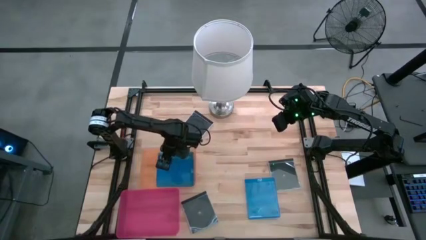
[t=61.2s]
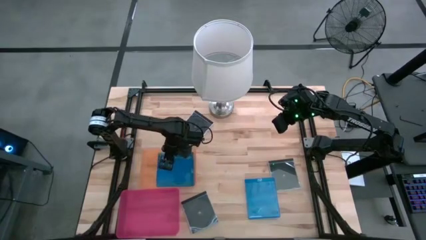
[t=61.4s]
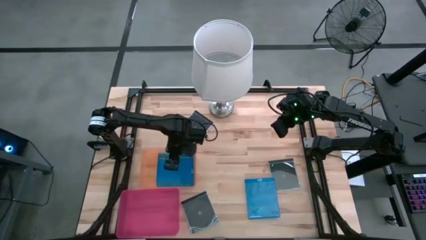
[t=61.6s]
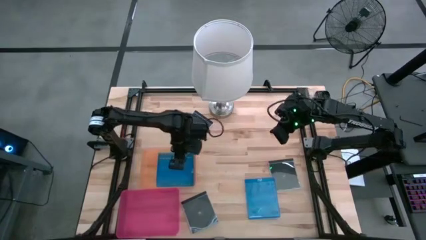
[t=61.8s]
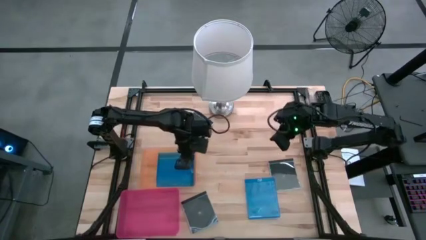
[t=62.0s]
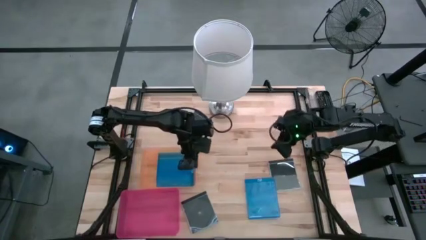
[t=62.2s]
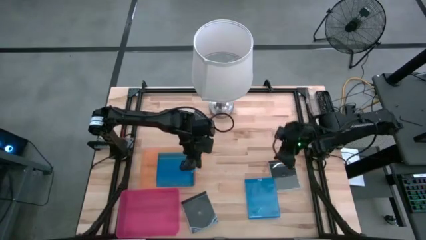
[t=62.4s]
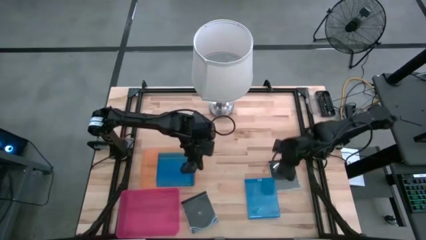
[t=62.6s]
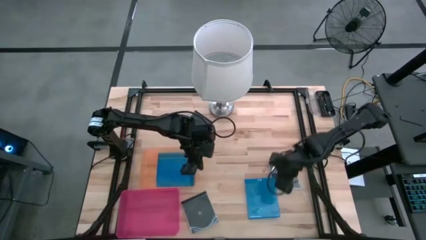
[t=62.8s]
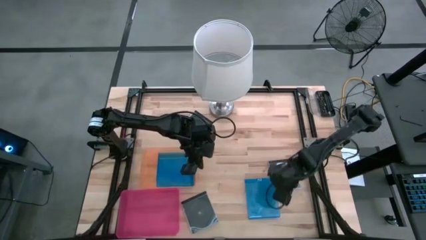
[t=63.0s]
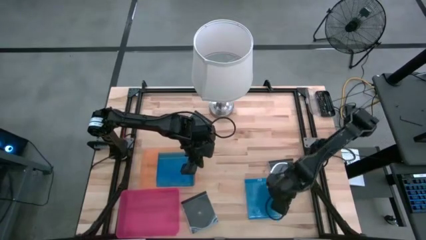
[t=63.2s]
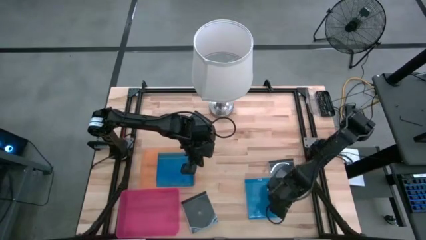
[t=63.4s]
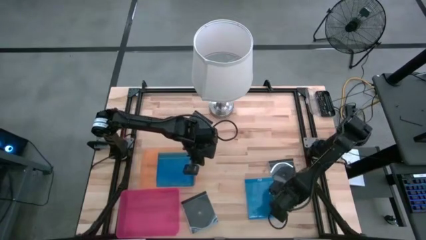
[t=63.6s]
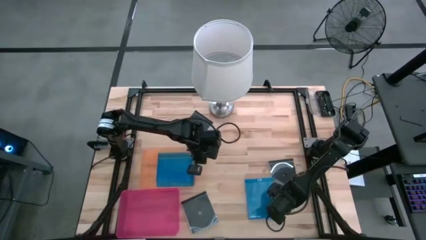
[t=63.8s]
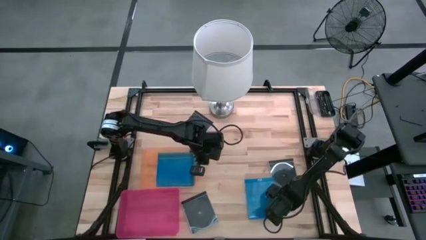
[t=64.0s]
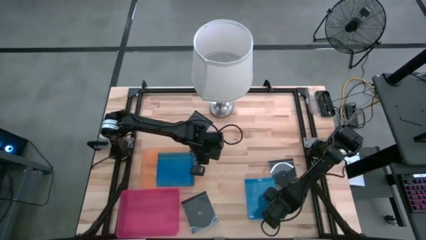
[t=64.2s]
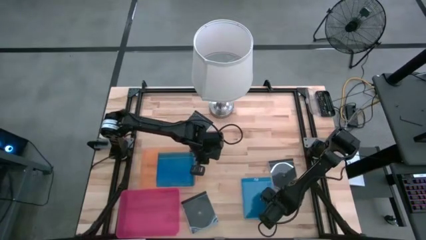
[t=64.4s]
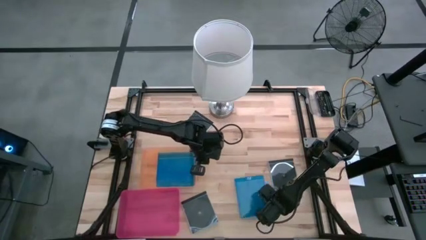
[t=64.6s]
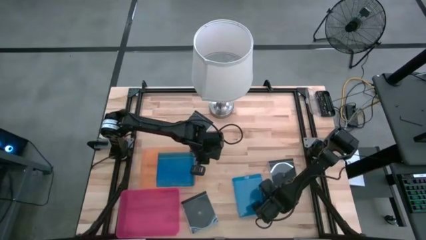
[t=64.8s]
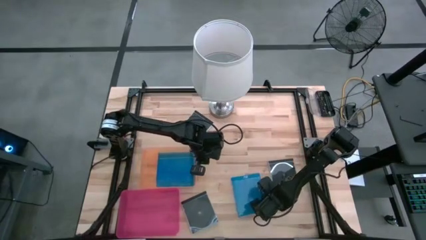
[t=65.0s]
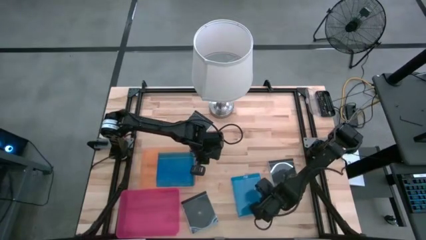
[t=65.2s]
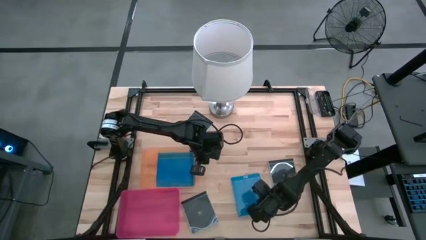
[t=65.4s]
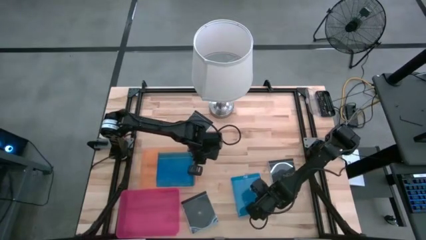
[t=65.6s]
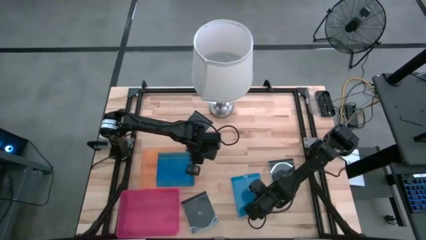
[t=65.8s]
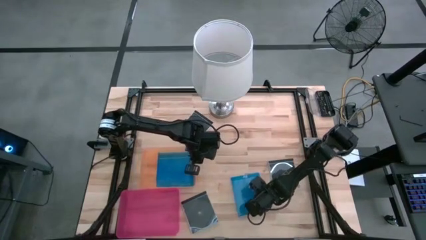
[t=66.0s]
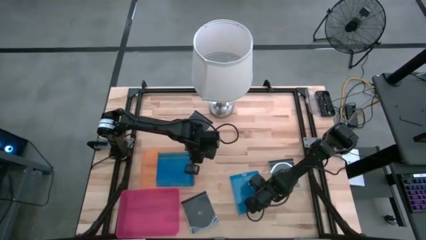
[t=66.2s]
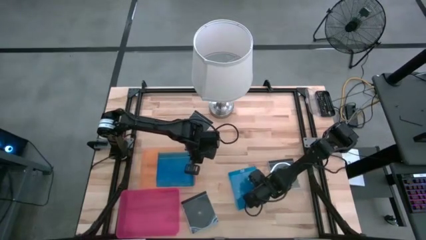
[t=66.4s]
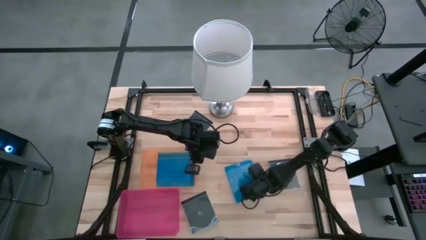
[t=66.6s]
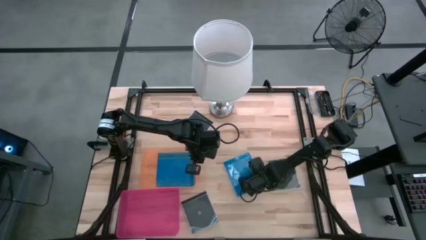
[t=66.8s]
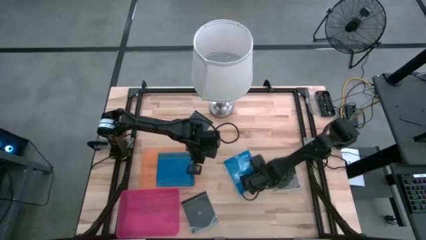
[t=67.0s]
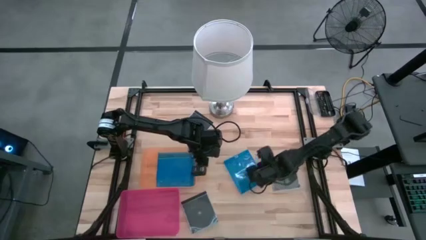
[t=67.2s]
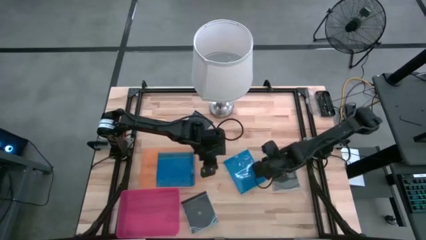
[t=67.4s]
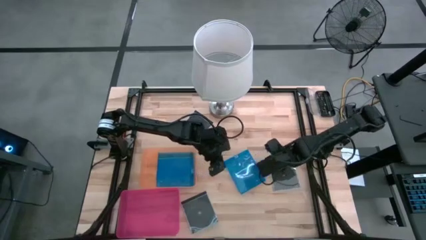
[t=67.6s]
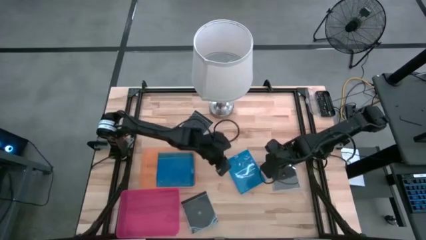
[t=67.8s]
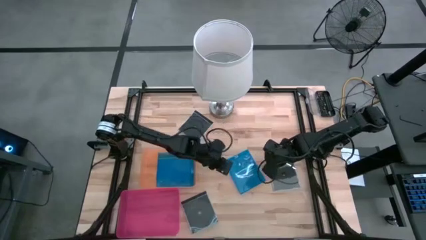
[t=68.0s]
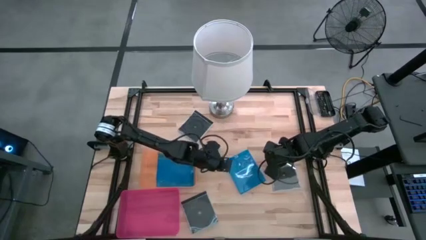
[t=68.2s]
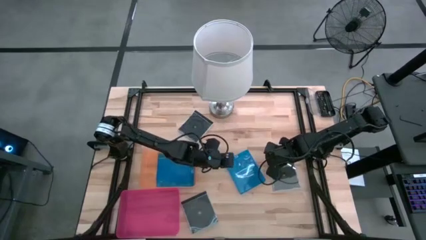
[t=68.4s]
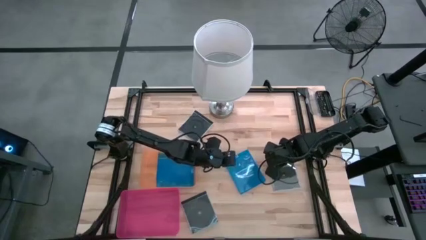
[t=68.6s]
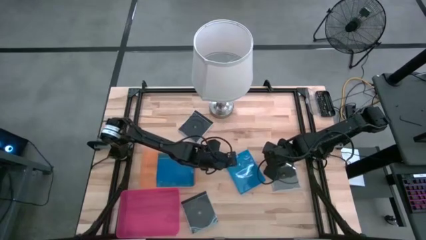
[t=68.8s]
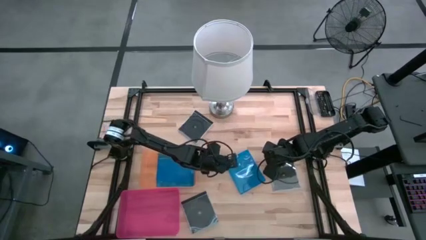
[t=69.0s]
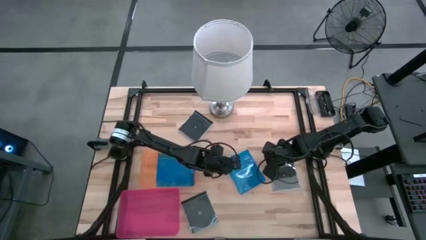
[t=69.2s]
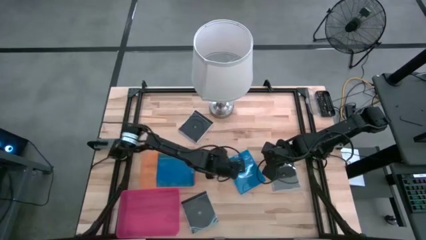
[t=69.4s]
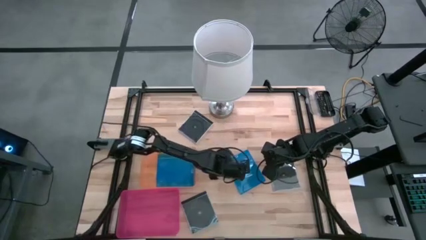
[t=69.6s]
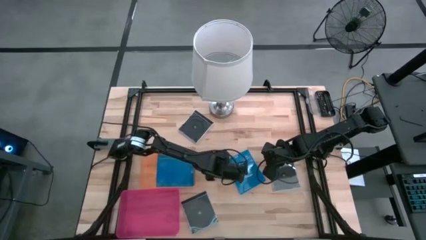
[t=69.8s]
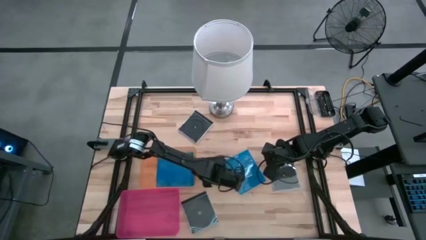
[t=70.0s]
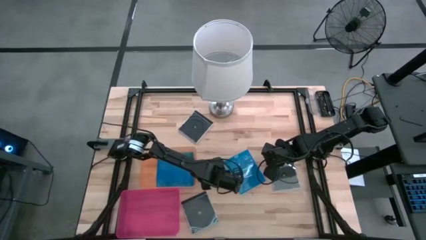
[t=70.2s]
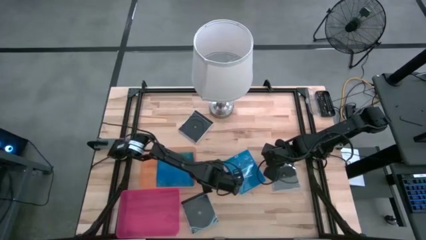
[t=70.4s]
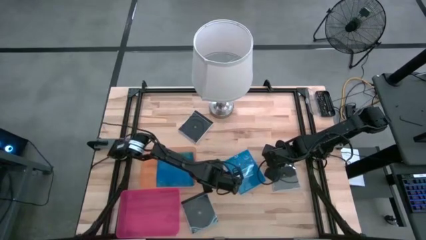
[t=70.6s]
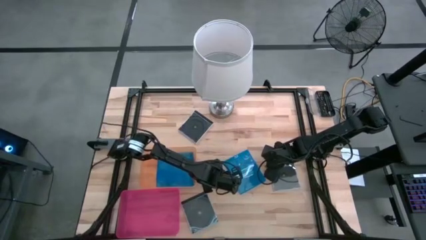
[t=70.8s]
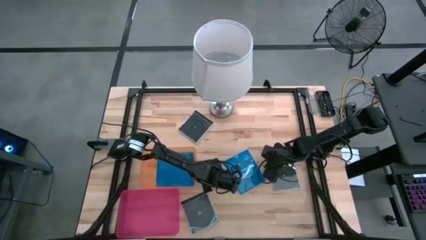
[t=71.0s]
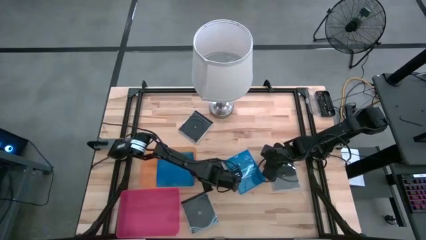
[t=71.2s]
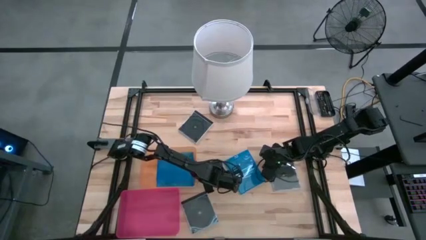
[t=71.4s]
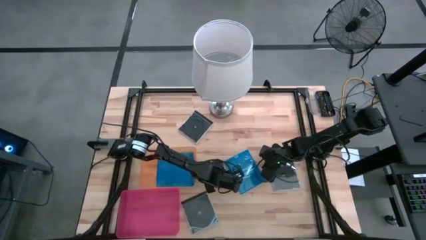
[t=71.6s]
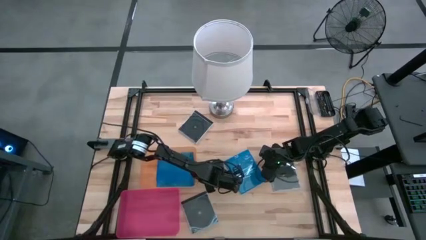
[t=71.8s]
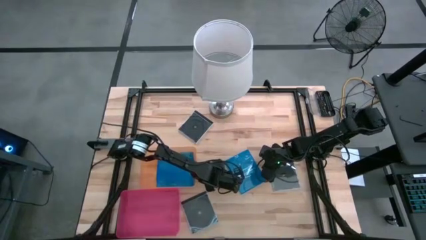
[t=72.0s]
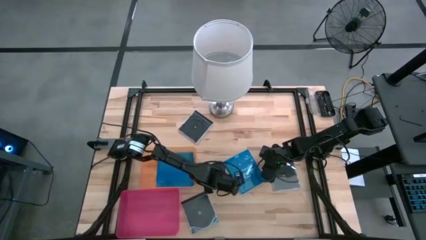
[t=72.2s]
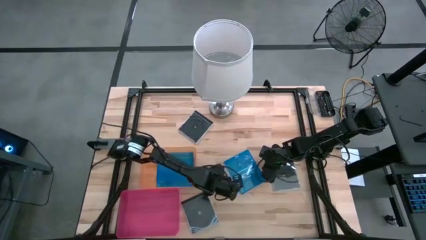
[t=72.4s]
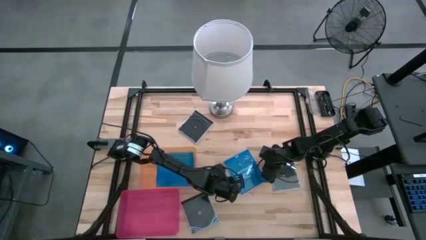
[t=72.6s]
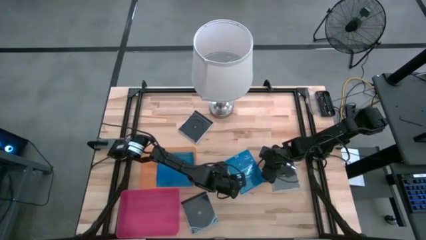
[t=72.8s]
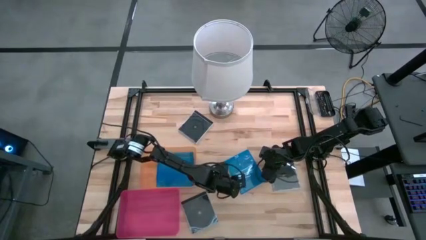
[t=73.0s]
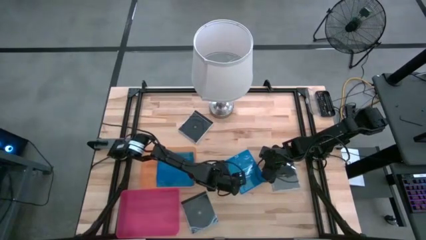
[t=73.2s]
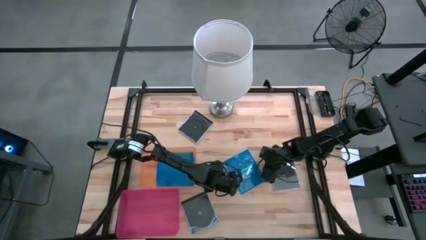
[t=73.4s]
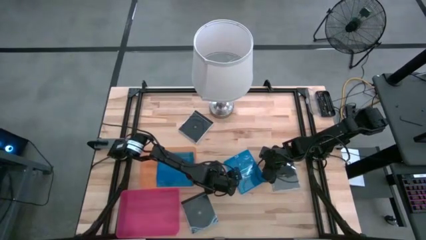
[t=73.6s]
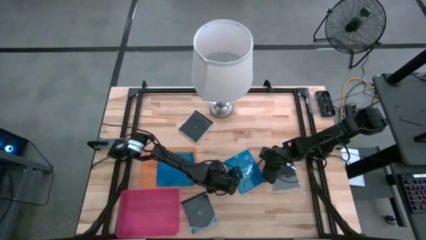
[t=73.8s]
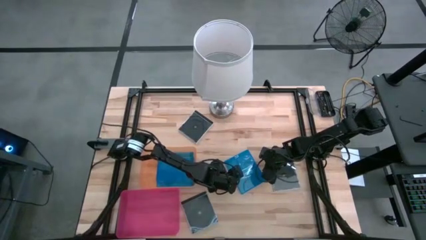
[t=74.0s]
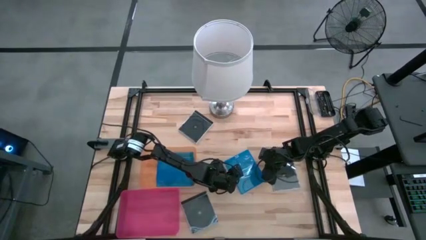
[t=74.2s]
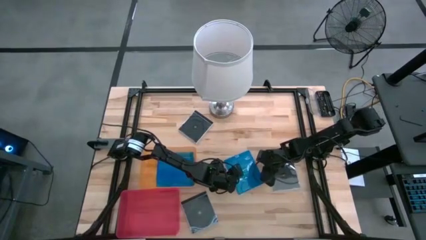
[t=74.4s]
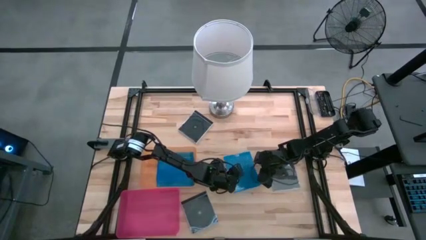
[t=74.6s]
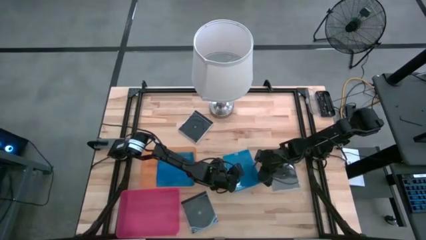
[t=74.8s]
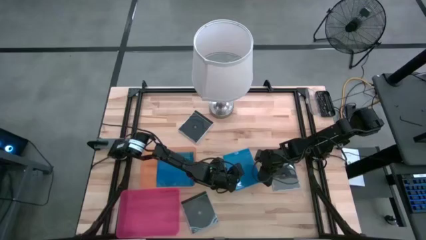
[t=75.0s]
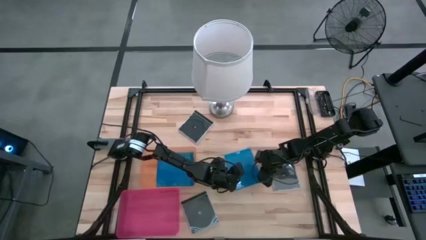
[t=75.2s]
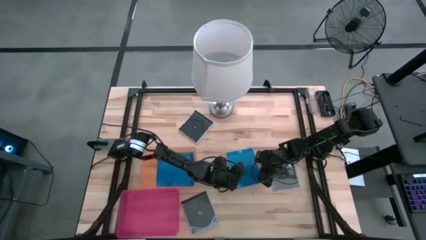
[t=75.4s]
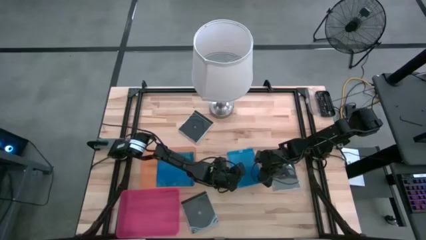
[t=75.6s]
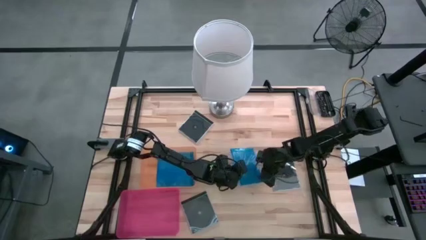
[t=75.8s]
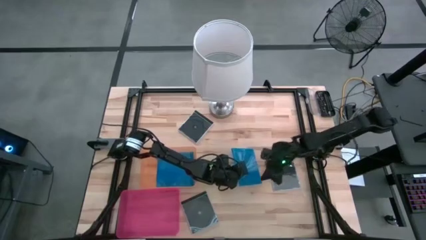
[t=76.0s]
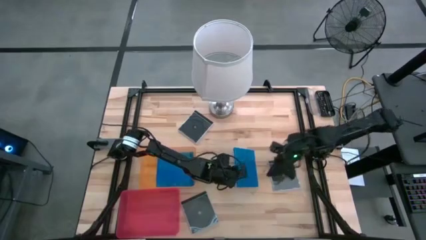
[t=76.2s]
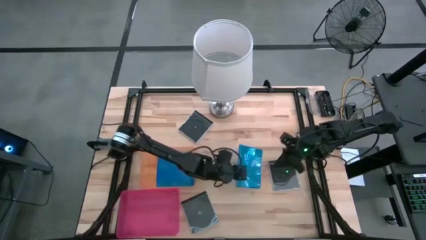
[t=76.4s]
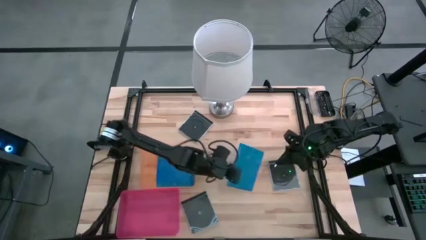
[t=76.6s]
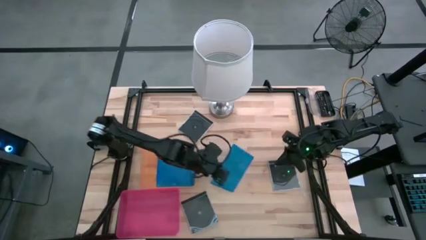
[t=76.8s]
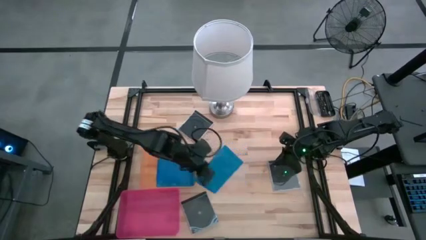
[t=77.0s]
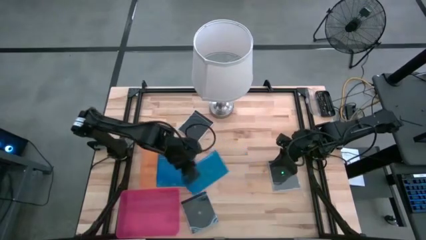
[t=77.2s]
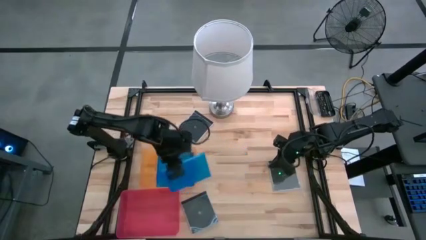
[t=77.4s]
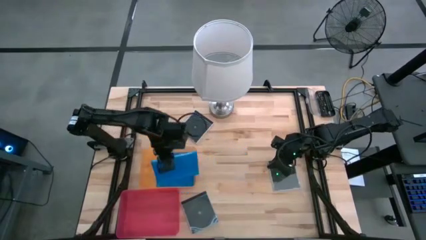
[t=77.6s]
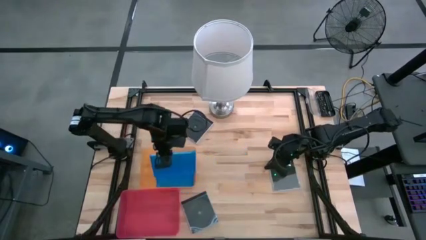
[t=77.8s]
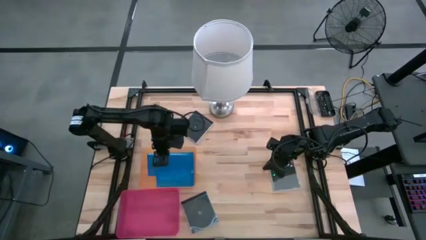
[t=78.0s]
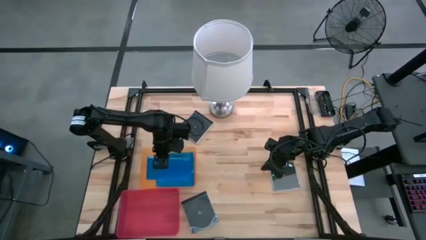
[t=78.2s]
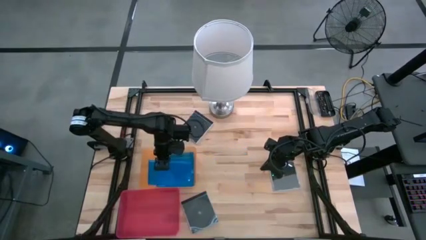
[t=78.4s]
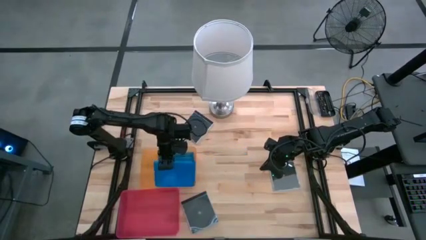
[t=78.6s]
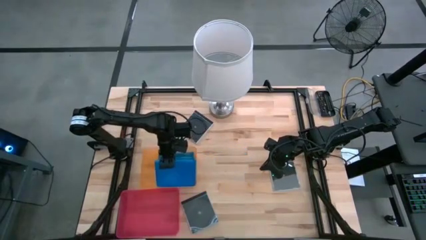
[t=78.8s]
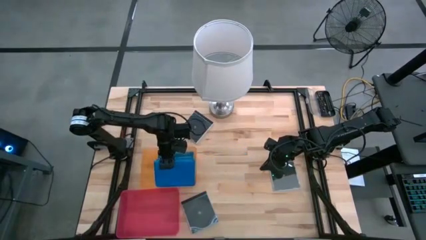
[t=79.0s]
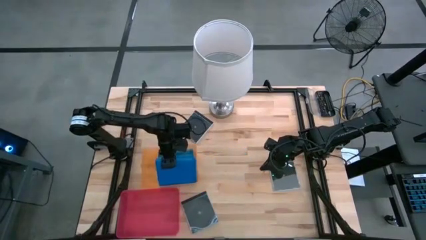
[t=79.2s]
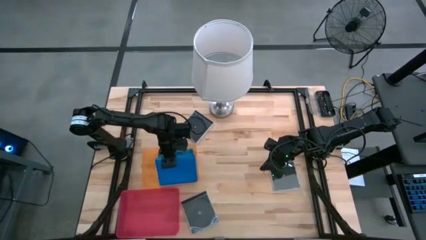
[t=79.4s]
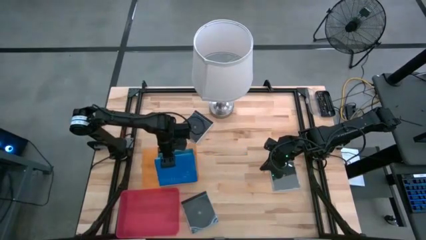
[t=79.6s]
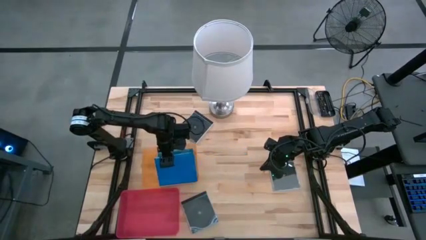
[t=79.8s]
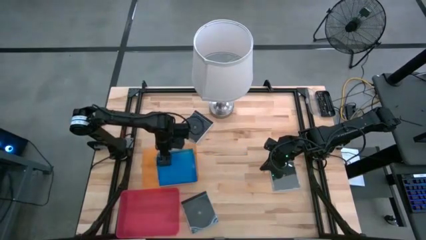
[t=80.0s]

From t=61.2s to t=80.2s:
Task: Pick & place jewel cases by type
Put the blue cd case into the orange bin
